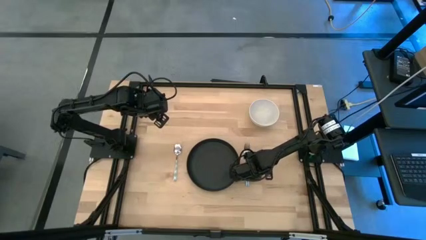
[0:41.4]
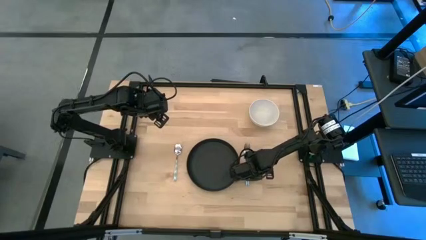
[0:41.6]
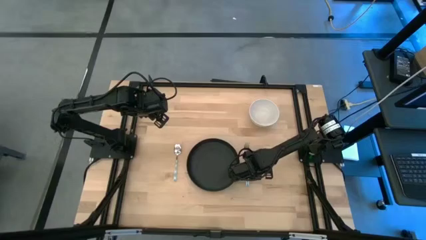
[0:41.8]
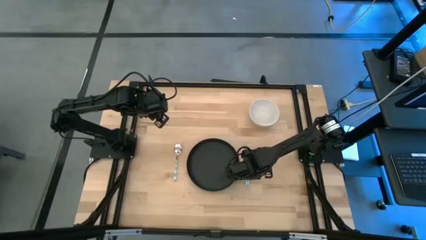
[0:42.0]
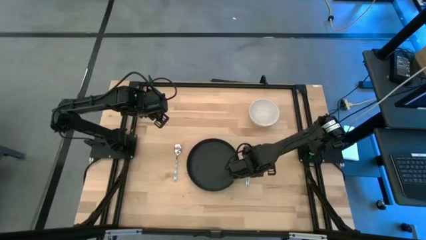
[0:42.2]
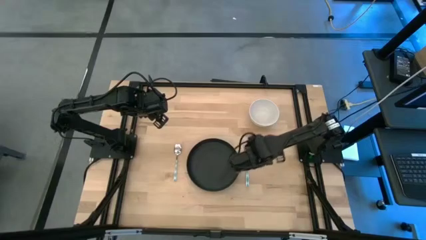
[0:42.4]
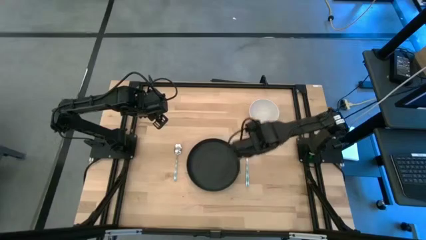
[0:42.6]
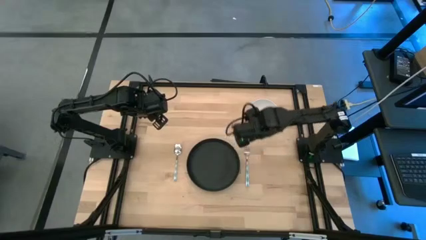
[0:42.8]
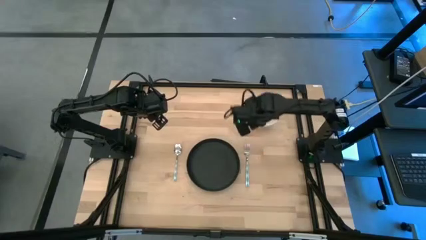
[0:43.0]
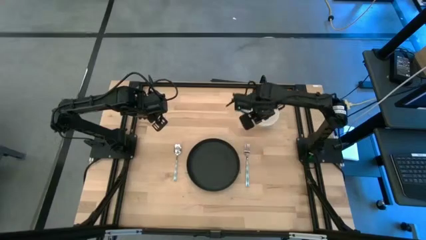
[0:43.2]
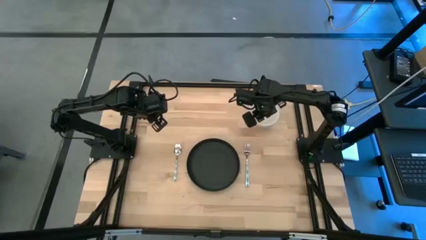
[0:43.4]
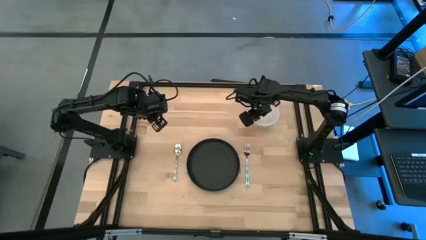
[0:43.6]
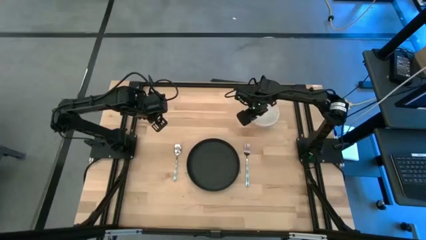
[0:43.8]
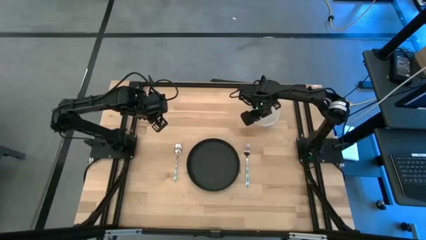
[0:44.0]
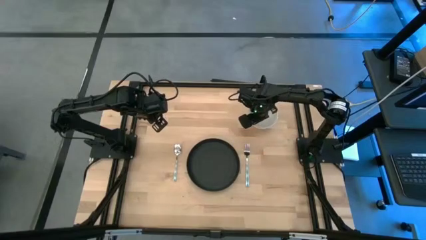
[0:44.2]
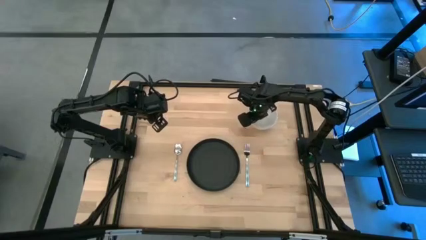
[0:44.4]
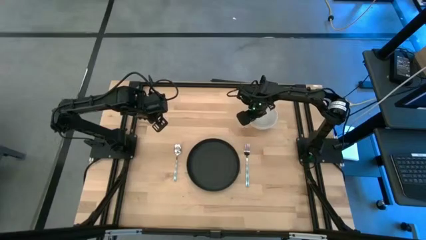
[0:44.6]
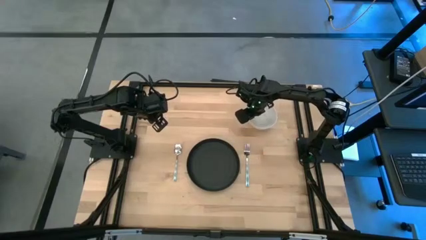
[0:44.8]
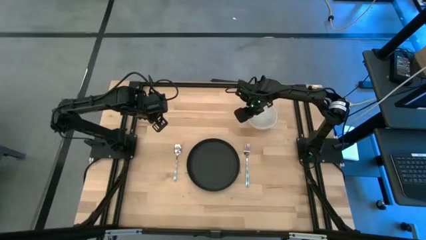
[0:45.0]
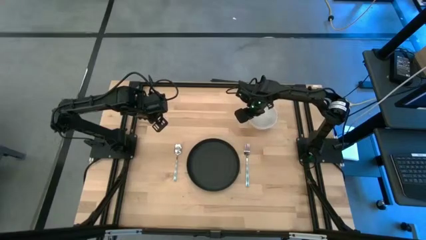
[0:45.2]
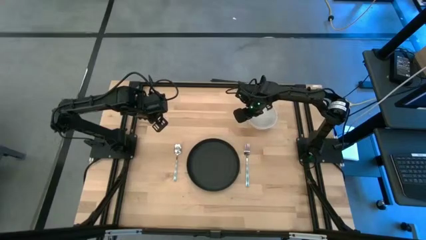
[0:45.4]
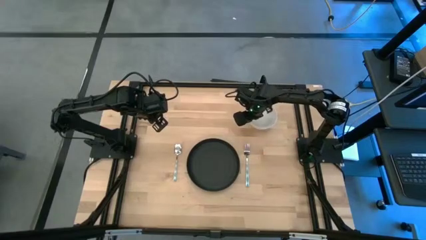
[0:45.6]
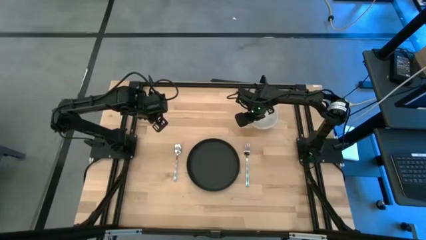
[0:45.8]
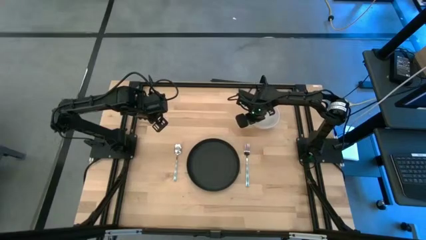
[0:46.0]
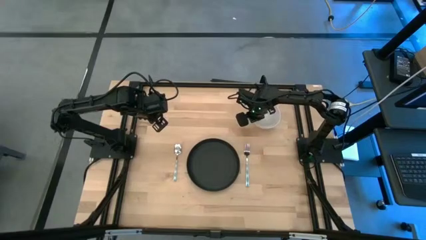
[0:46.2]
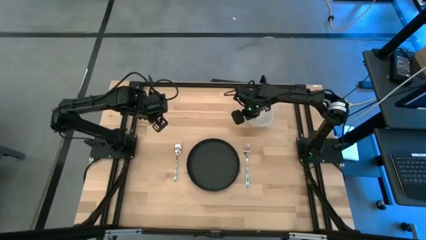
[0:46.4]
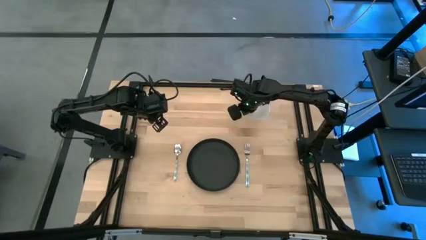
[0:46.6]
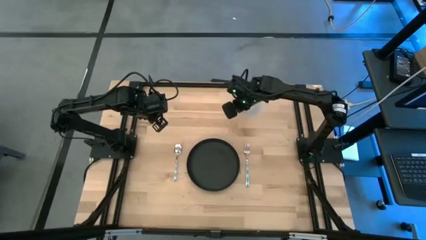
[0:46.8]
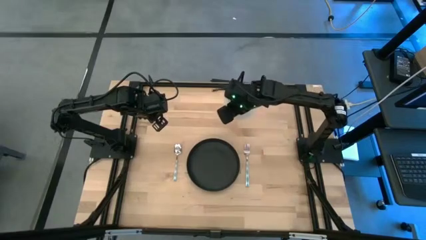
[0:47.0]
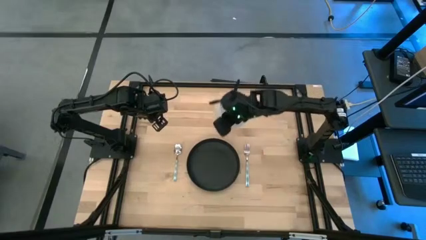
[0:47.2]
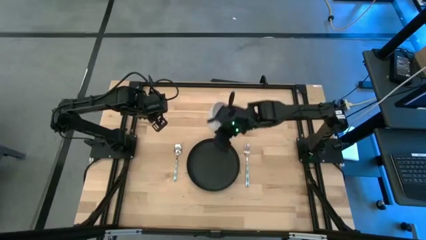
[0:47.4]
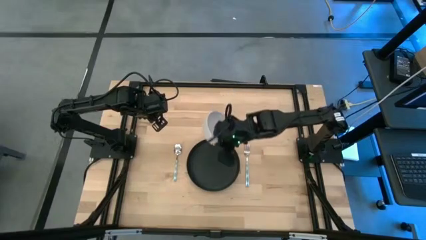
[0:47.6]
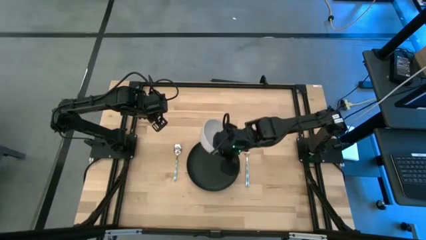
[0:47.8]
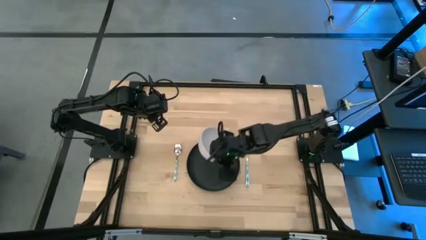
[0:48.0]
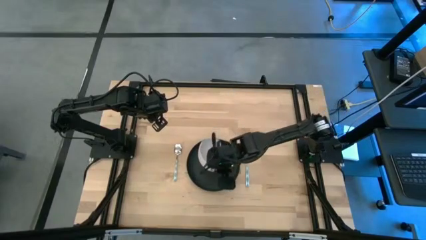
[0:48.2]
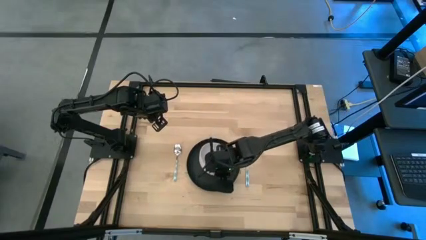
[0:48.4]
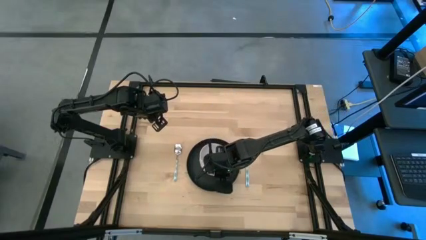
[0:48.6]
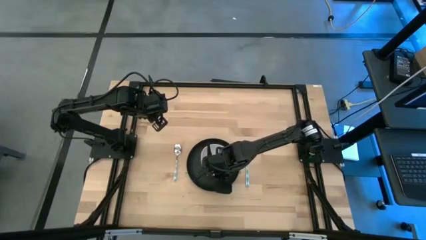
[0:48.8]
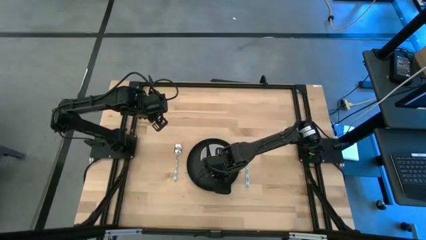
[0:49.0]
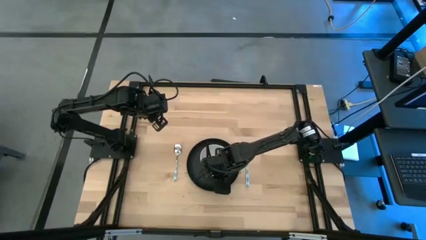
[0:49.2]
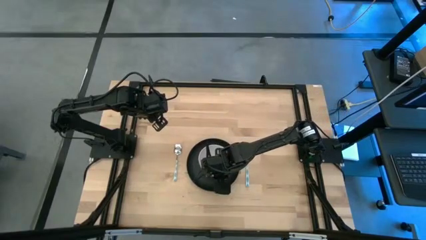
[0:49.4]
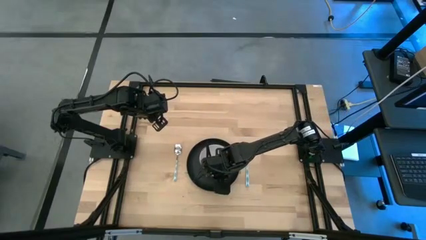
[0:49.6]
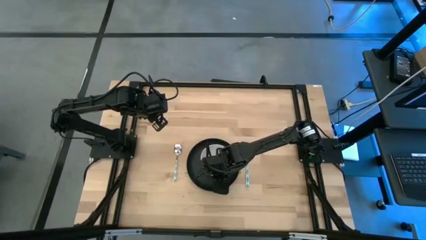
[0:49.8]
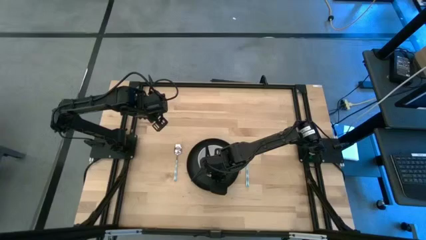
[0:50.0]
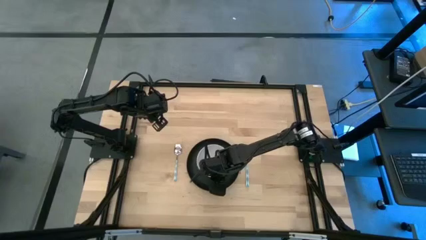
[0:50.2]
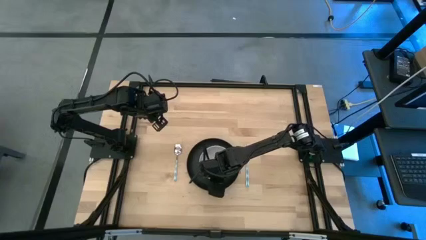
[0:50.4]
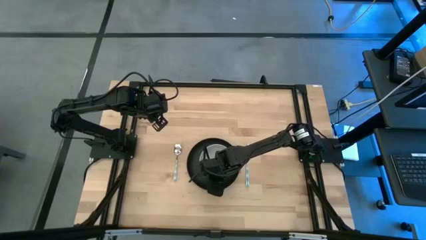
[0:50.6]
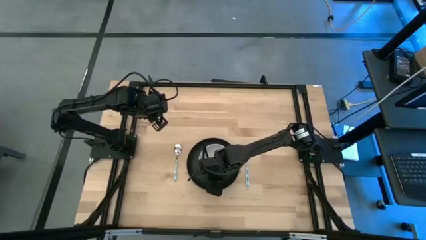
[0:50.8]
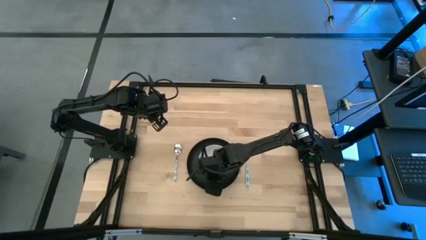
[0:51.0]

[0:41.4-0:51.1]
Task: Set table place
Put the white bowl on top of the black plate
